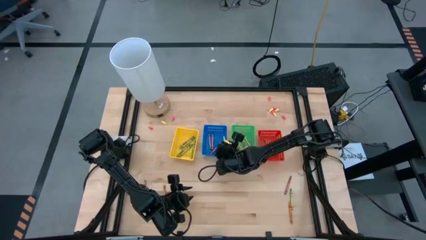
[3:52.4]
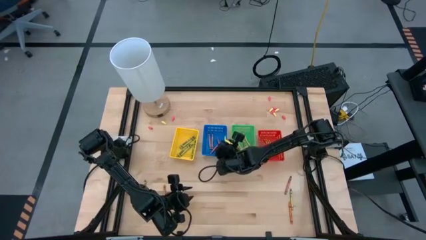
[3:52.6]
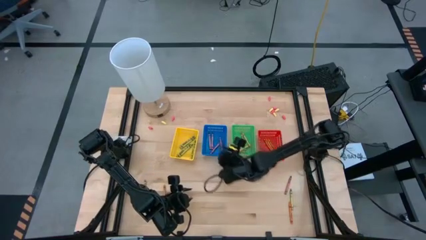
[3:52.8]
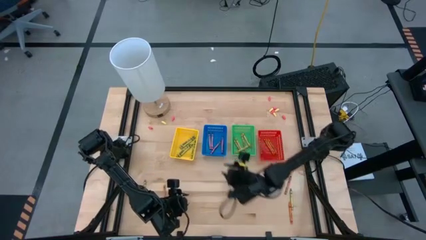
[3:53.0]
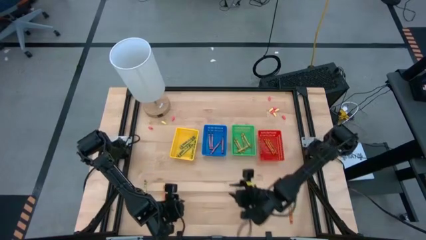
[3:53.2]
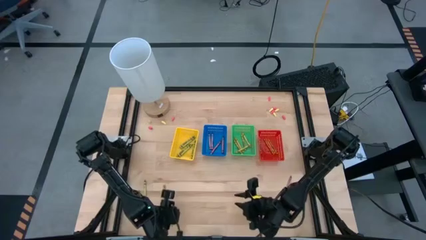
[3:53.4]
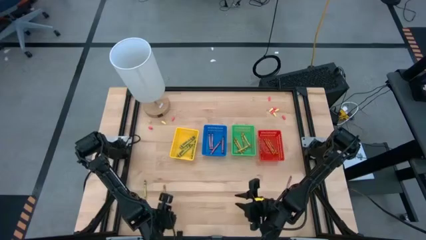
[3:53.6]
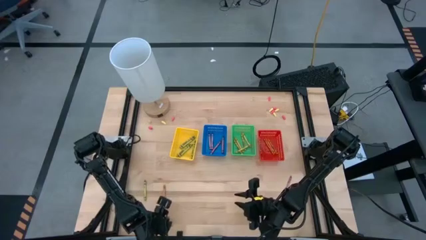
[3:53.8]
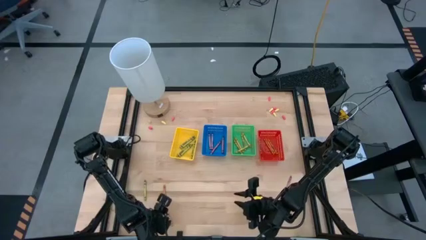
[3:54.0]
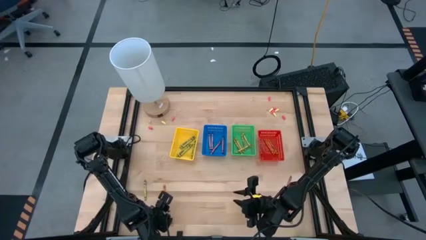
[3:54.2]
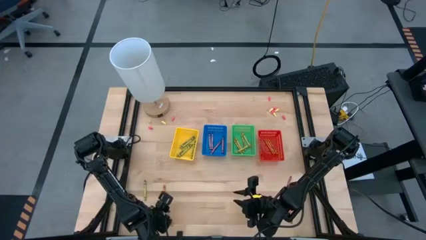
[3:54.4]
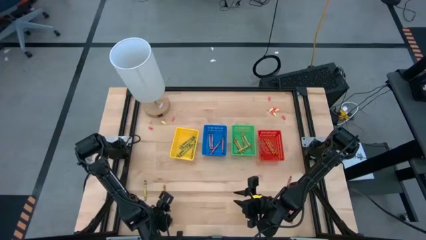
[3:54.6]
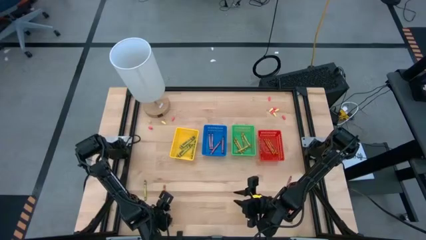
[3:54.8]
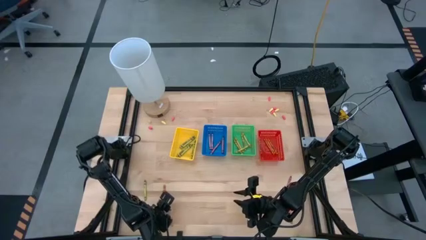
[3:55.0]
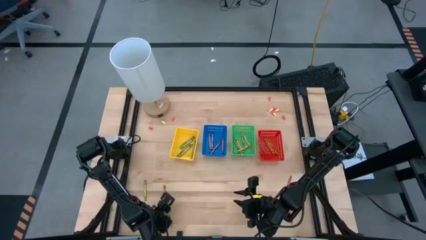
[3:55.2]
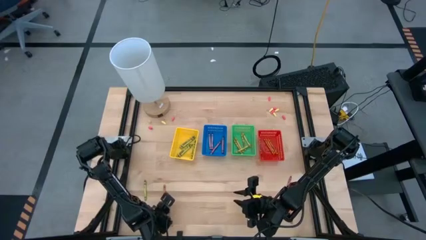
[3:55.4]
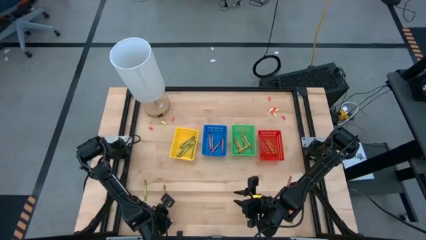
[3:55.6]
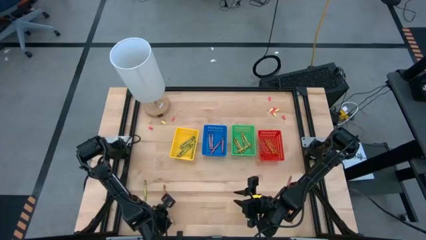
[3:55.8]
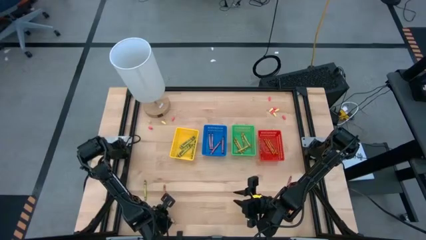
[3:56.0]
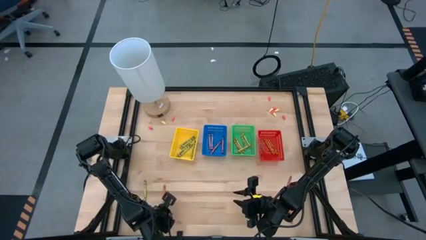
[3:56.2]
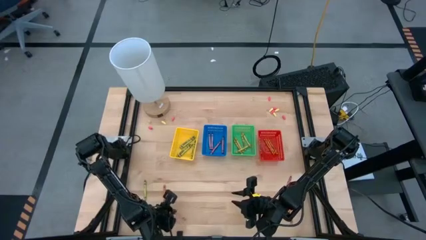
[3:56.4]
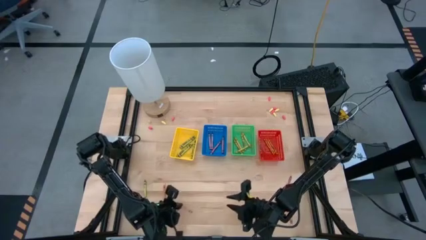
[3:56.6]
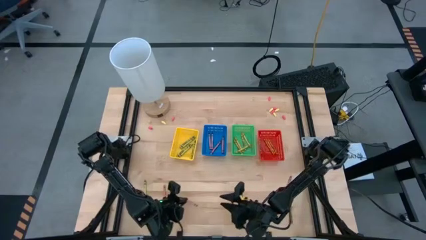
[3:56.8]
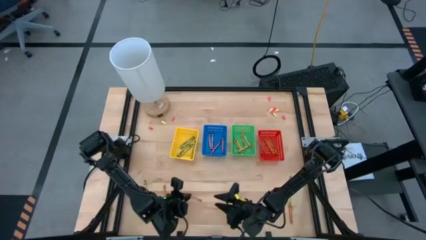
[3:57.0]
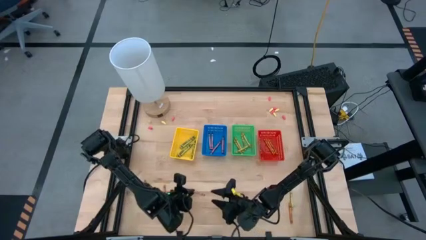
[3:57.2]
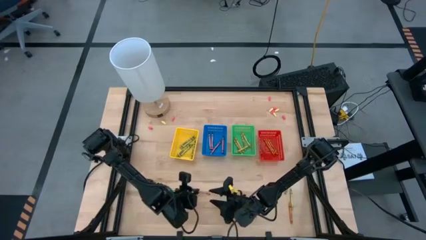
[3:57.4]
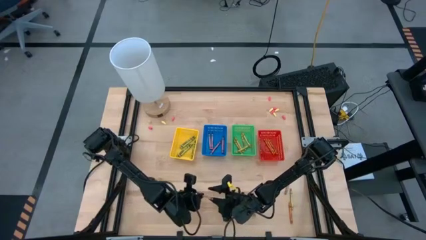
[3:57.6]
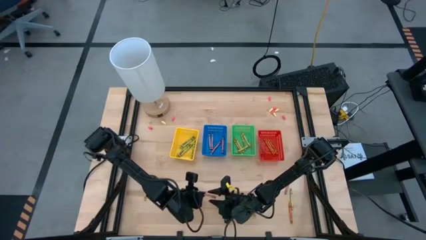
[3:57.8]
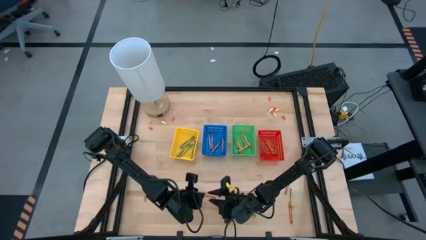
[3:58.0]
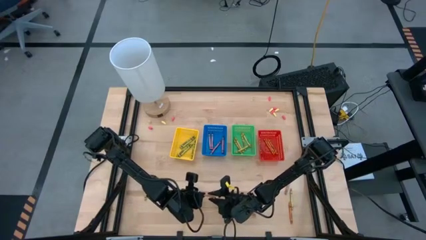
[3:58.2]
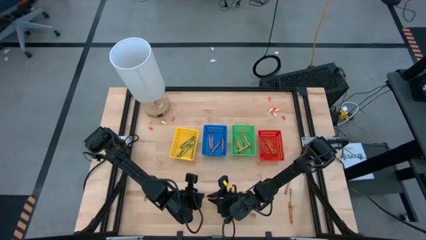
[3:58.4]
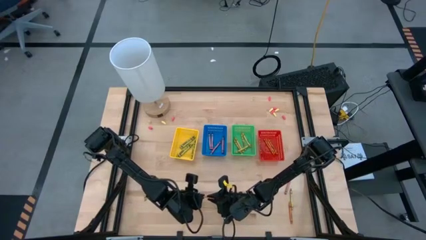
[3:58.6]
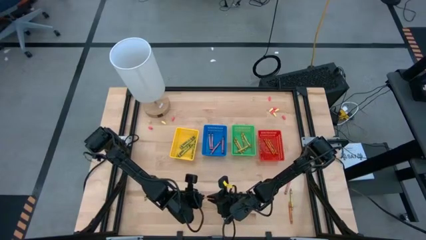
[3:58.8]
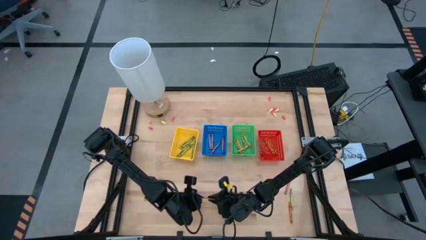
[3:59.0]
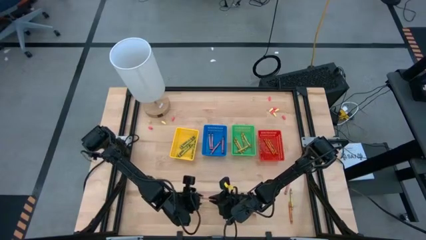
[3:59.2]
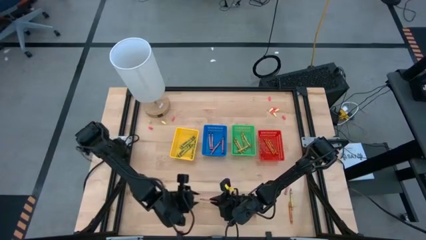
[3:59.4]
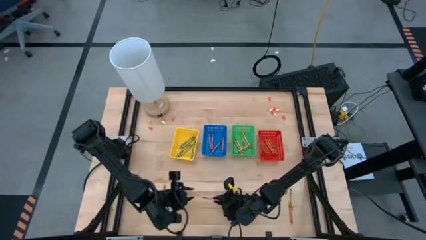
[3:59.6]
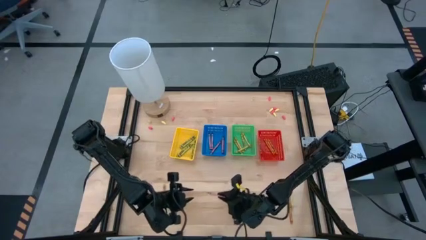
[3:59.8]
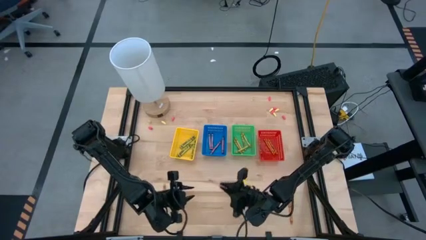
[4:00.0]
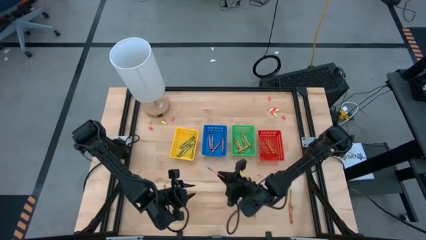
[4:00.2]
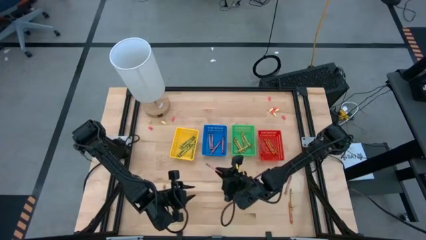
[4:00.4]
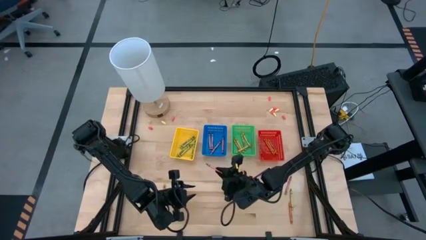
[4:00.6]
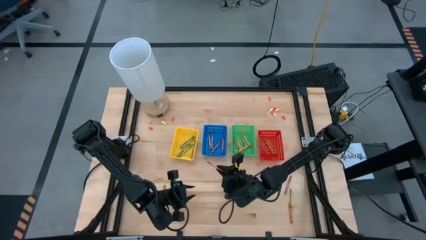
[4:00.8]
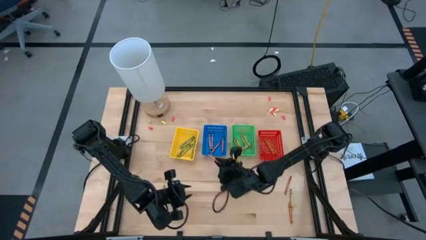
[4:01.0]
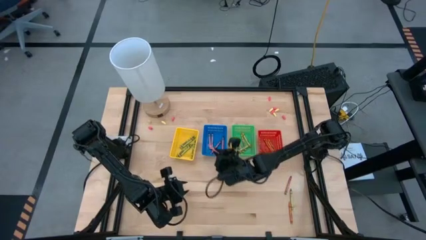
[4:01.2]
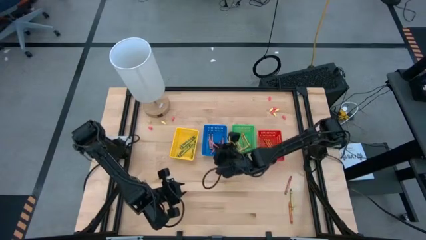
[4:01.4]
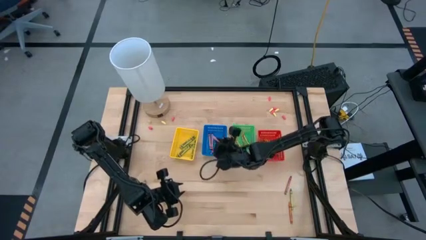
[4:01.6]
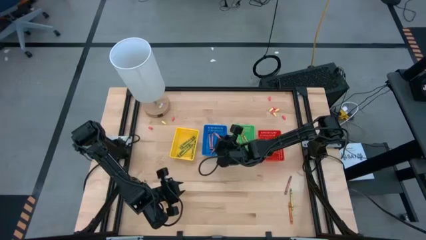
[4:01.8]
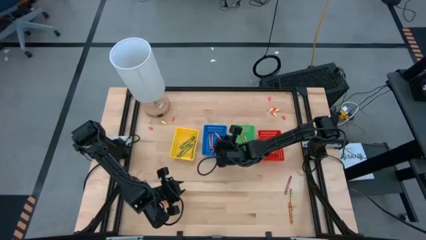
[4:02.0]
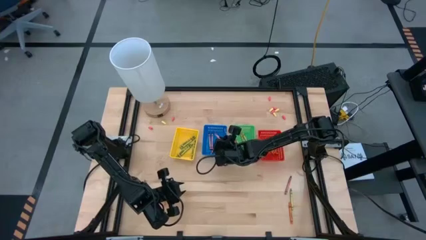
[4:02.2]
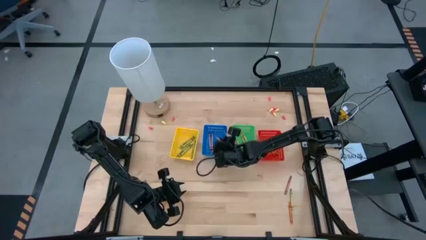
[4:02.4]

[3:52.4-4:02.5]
Task: Sort crayons
Put the red crayon into the blue bin

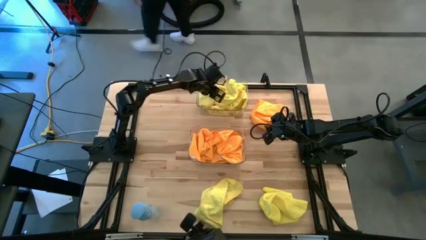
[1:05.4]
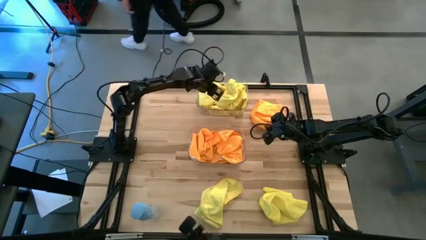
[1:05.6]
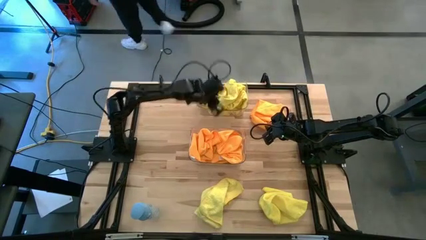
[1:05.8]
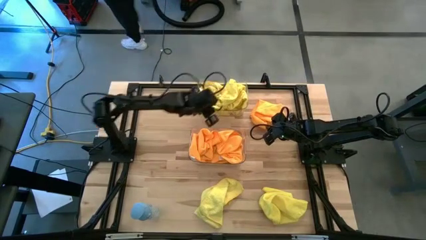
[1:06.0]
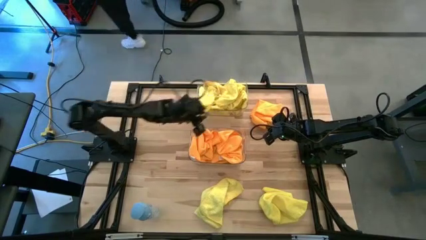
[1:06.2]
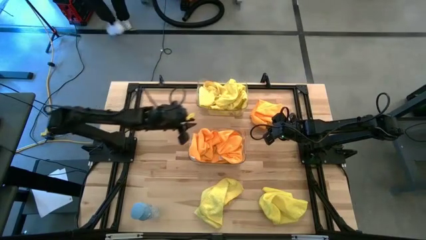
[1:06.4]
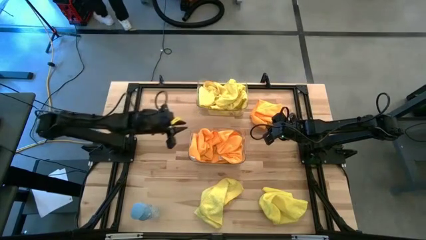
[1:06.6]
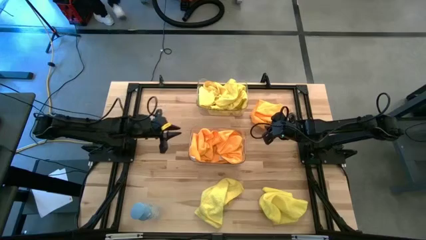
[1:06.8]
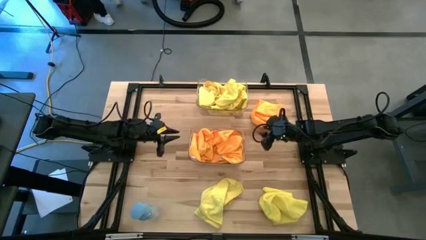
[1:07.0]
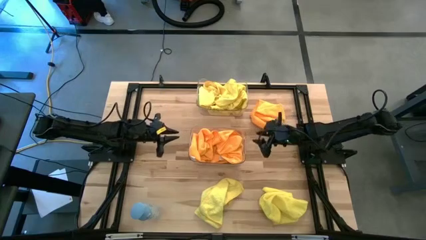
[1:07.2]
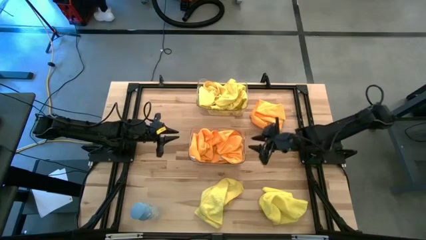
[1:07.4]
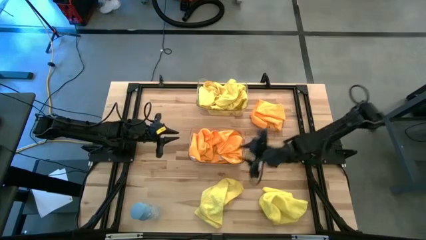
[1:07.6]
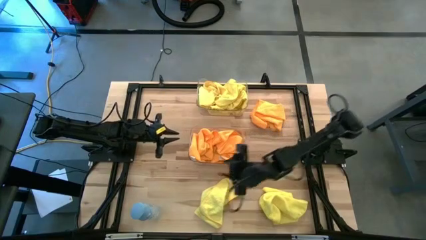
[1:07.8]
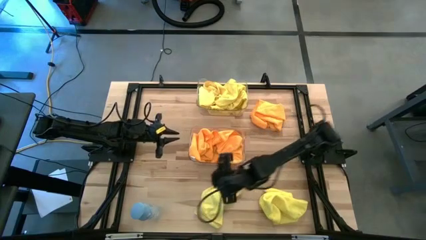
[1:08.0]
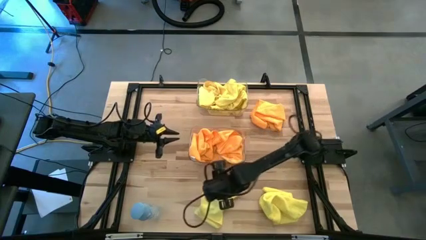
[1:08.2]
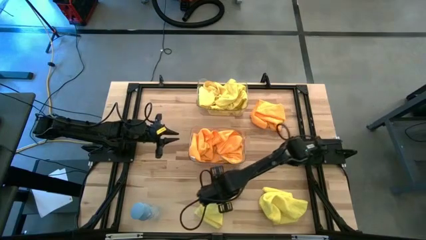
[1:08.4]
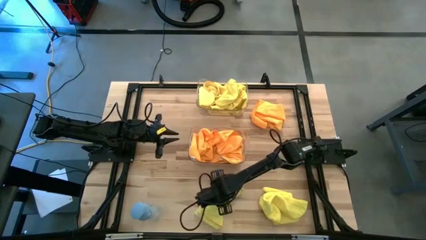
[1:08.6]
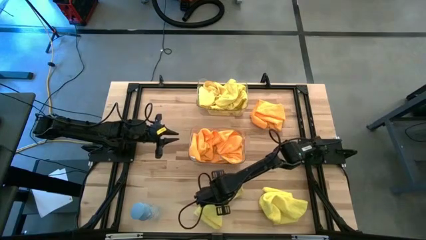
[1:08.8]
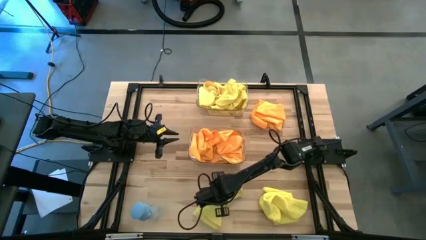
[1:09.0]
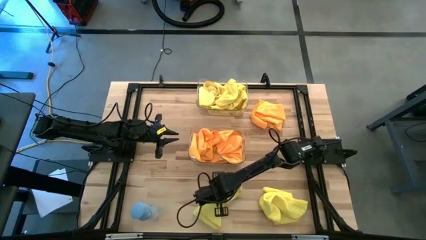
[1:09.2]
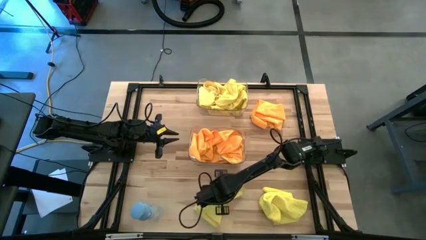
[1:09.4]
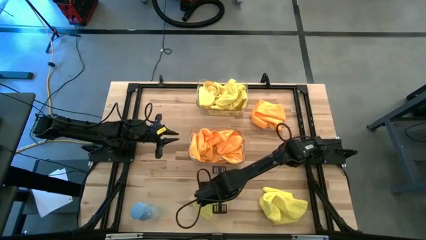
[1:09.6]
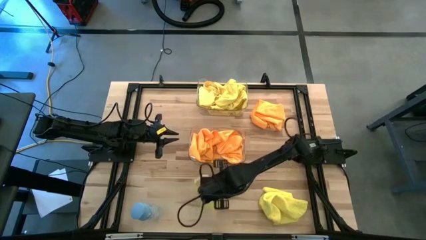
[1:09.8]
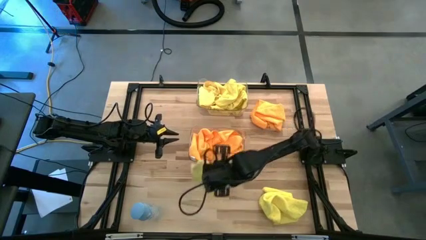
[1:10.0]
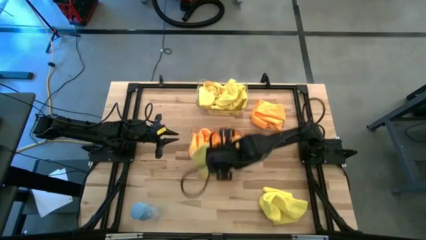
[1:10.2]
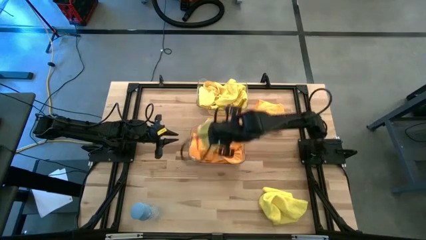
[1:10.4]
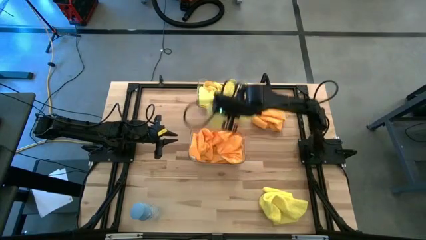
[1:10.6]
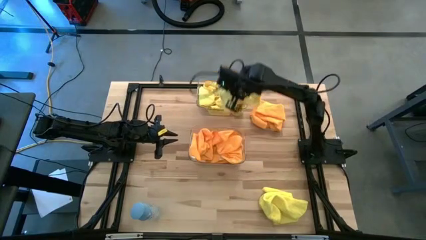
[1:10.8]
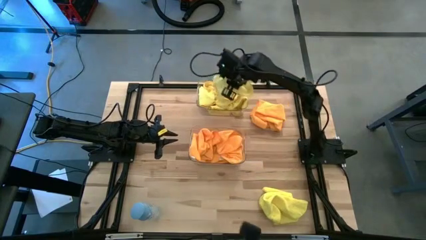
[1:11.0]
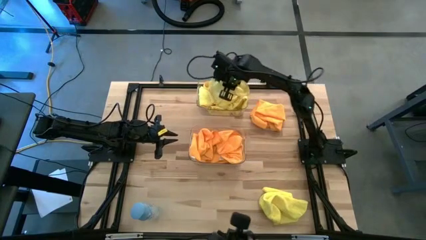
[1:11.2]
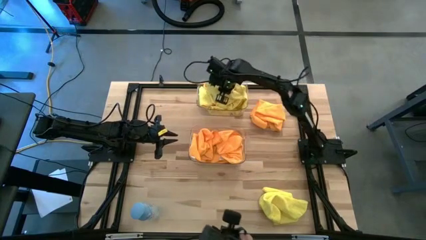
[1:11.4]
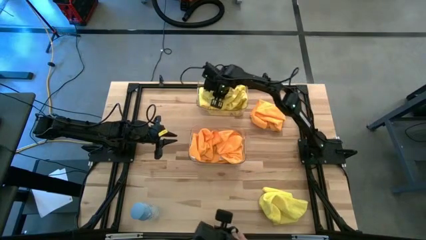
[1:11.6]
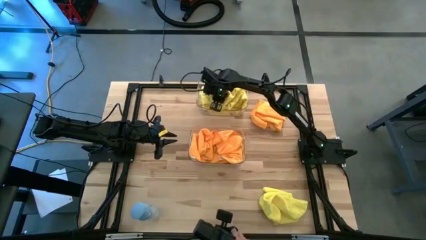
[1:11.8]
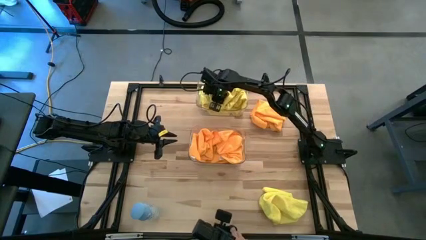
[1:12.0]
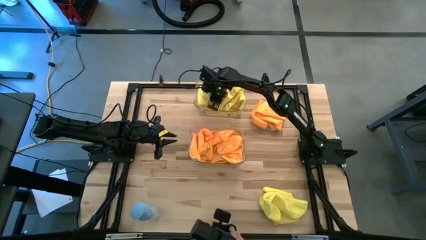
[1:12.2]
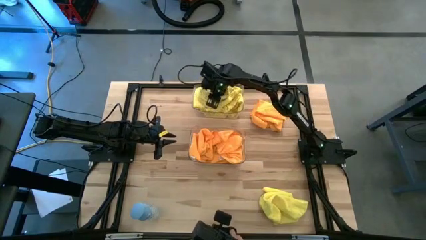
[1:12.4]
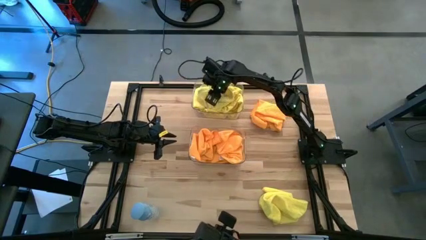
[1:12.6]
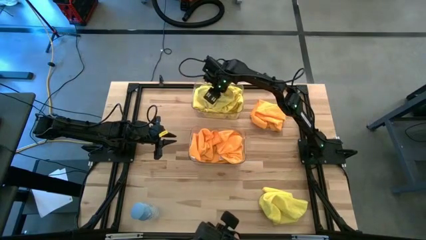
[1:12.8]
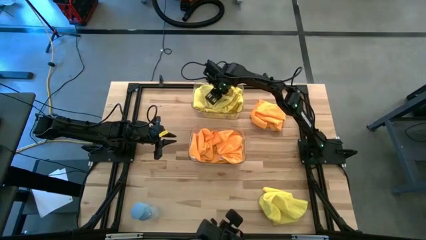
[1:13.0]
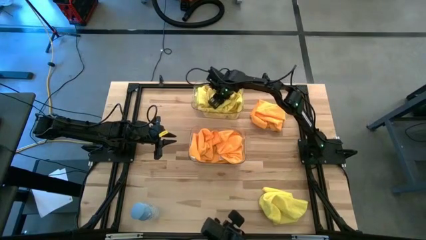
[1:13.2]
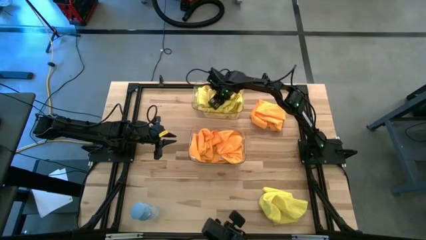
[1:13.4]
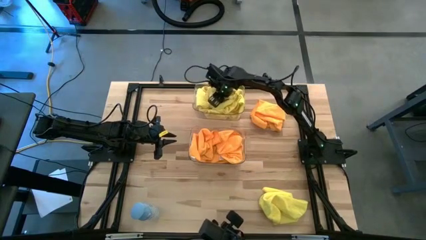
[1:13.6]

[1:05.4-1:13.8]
Task: Sort microfiber towel by color & place in baskets
Put the yellow microfiber towel into the top transparent bin
